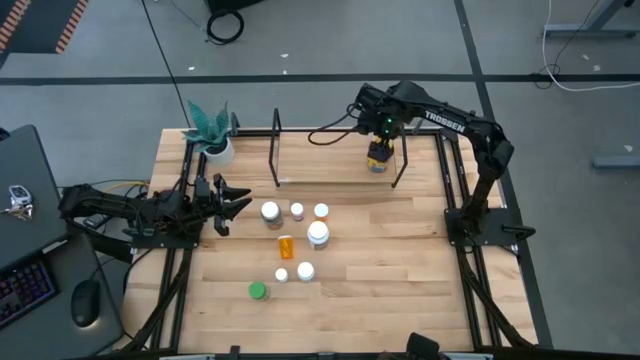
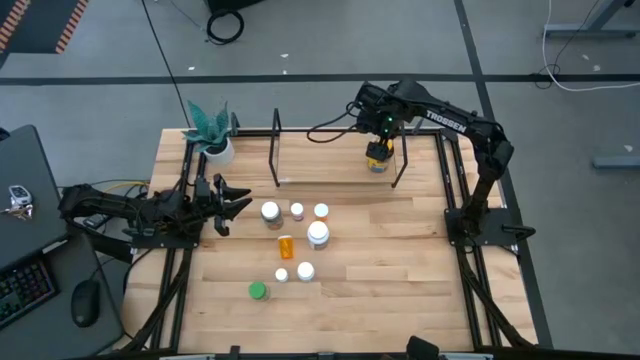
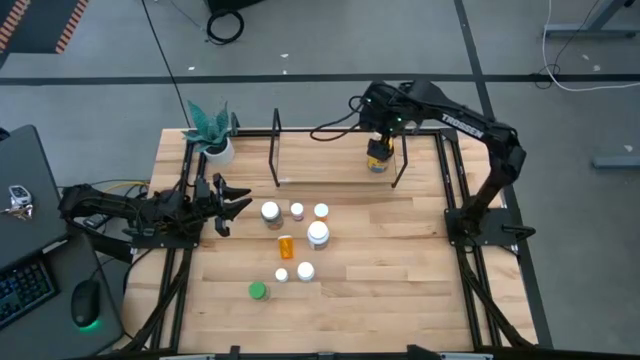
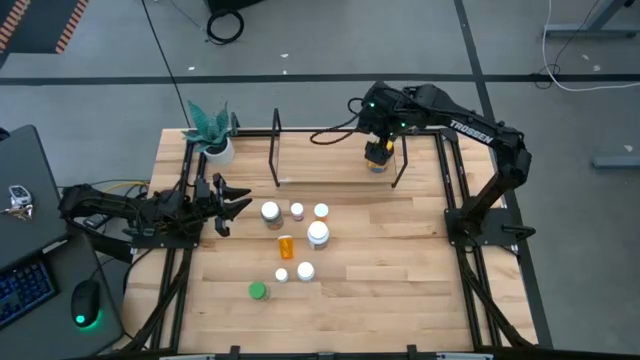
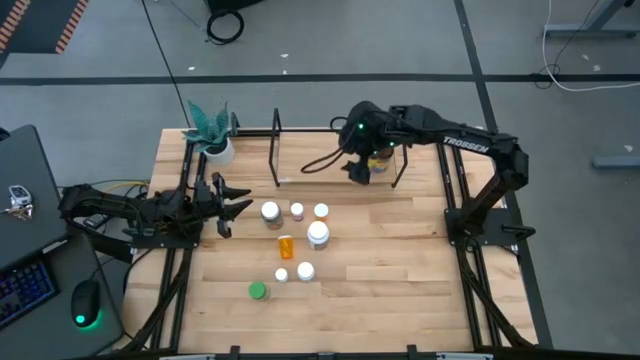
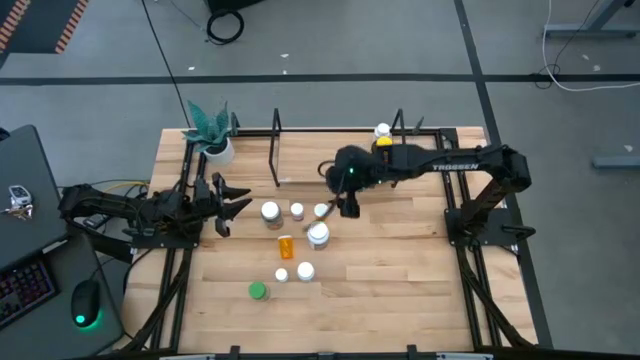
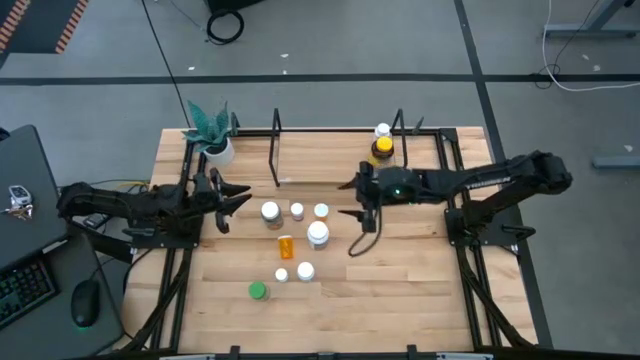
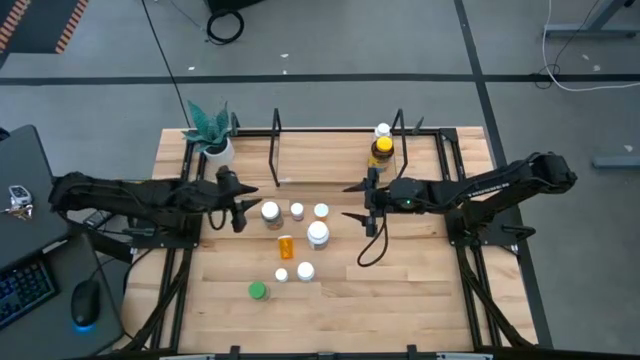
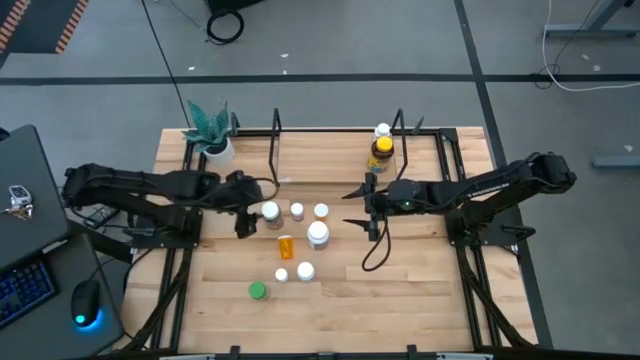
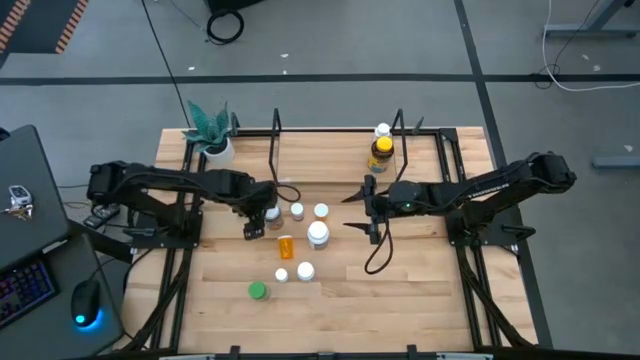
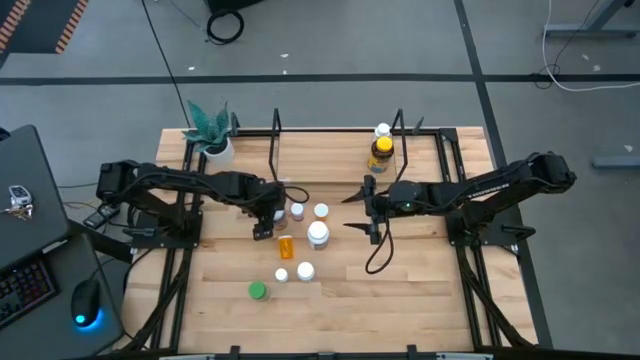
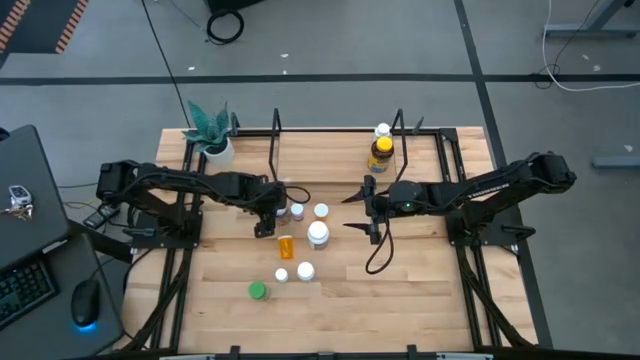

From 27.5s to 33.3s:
Task: Pick and place medicine bottles onto shelf by color
Put the white-green pill bottle on the shelf

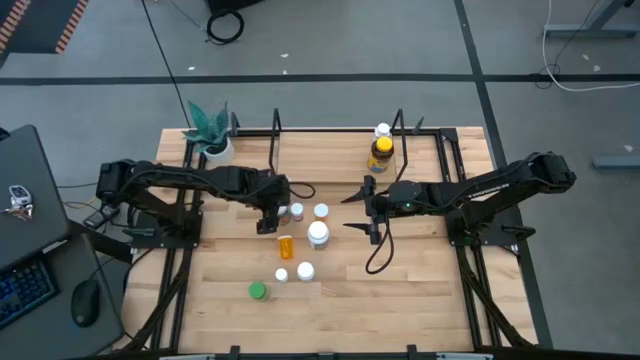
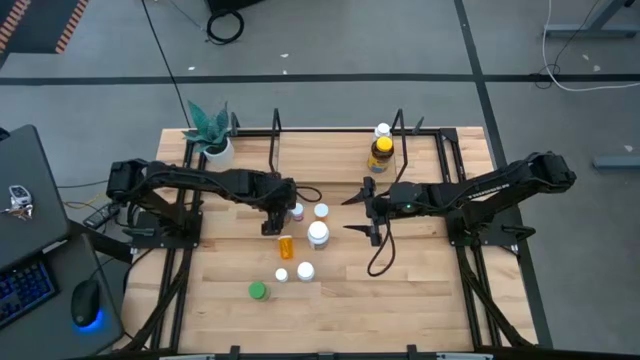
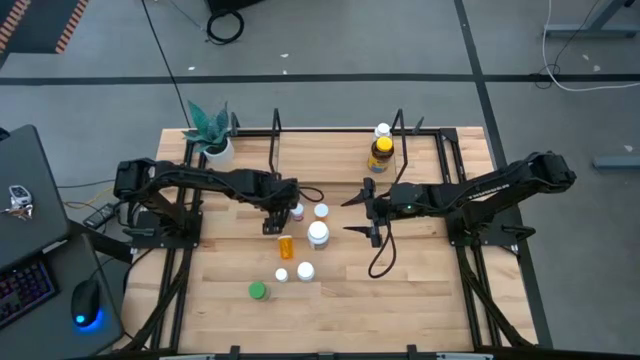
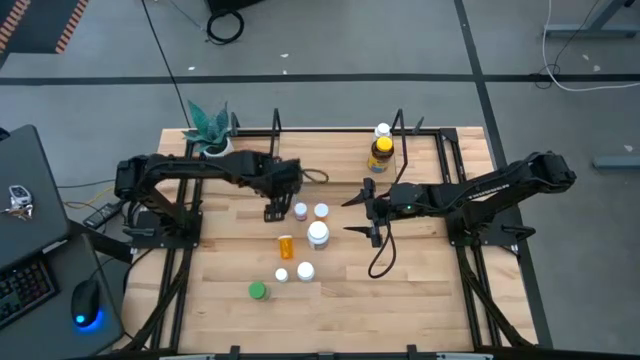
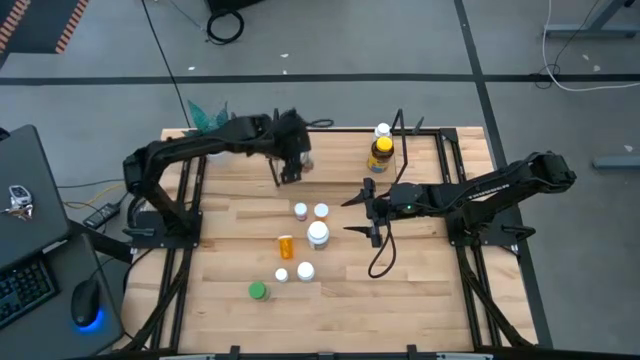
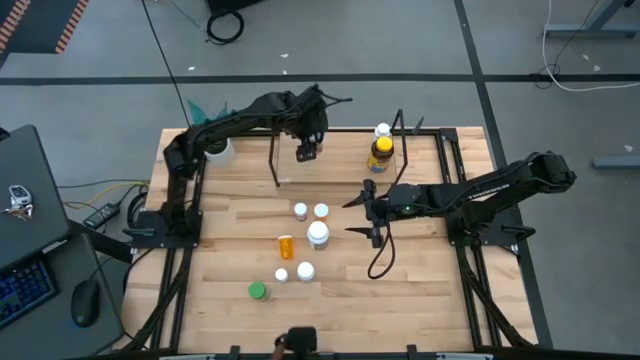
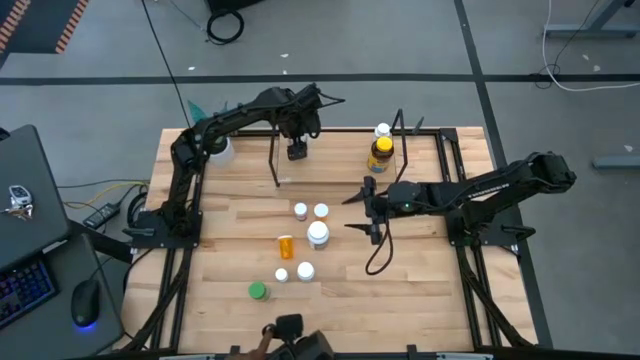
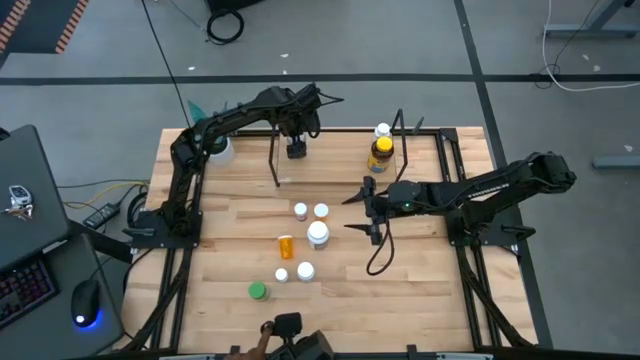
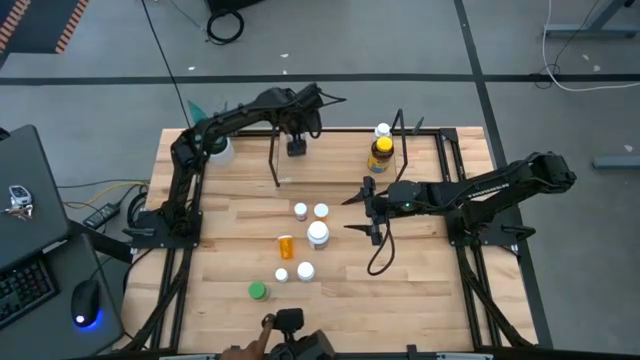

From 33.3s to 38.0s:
Put the white-green bottle on the shelf

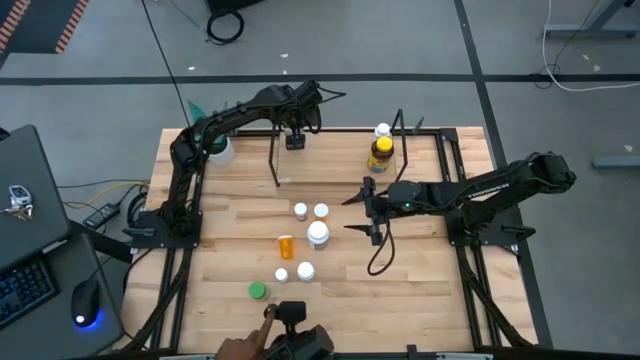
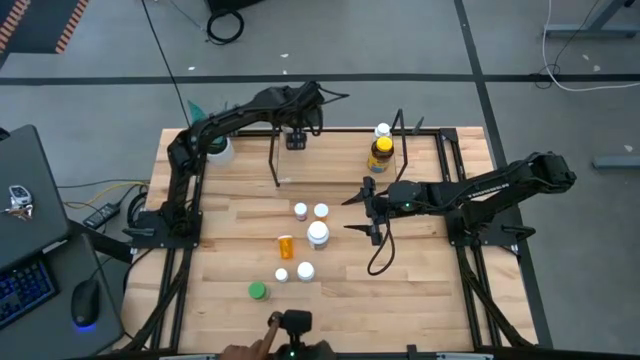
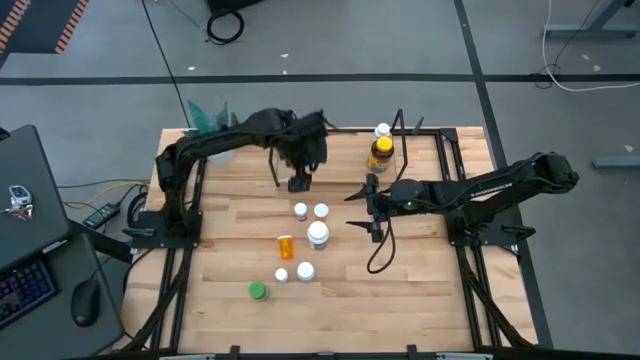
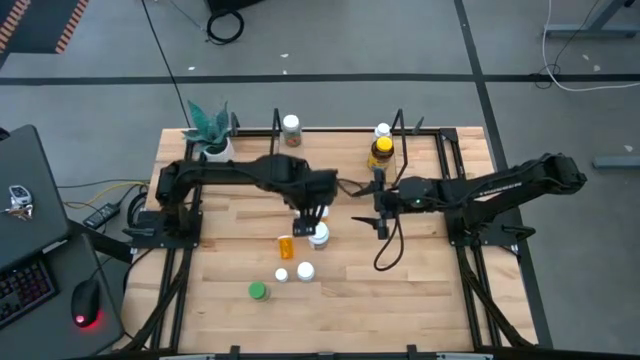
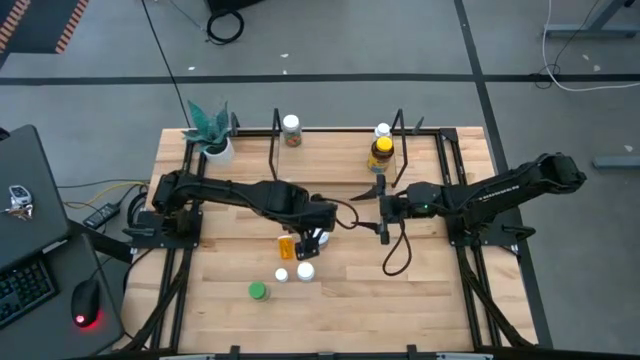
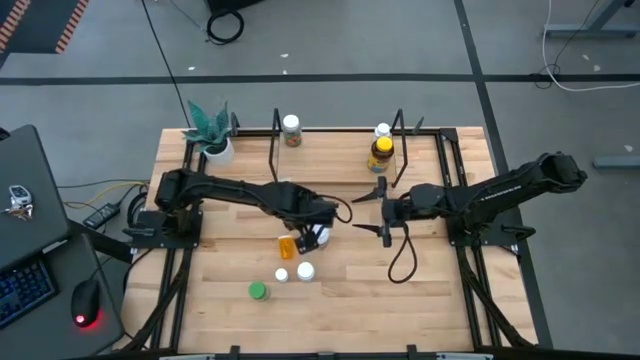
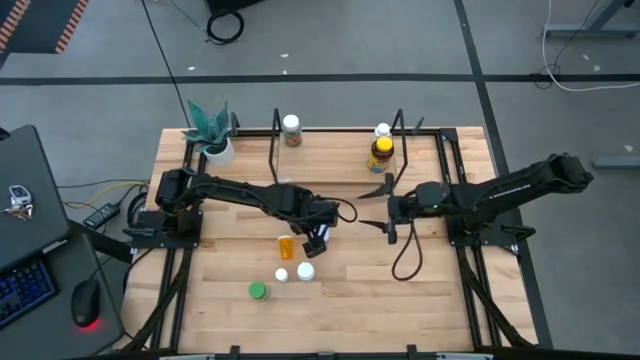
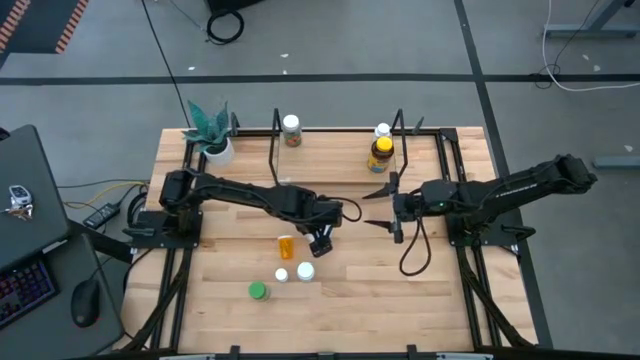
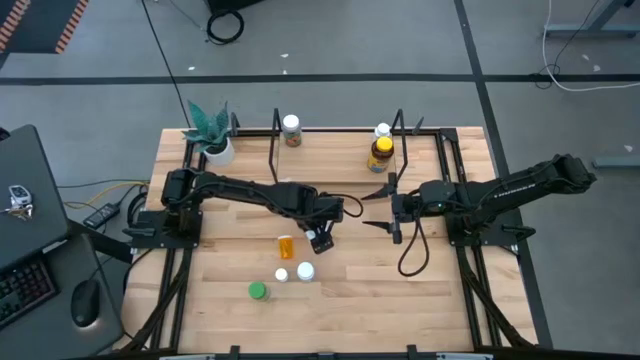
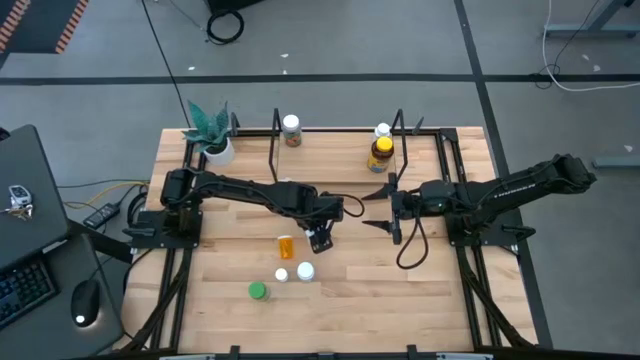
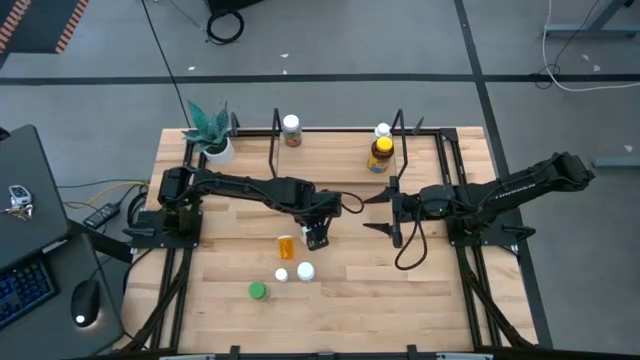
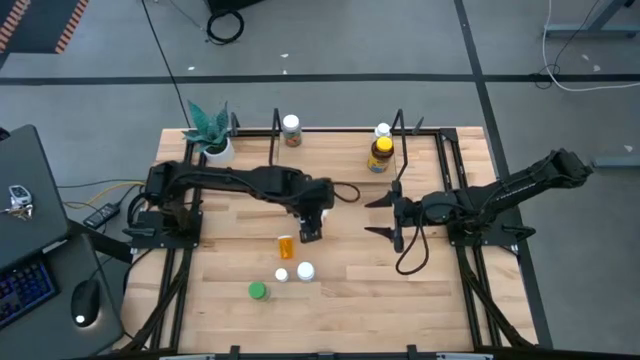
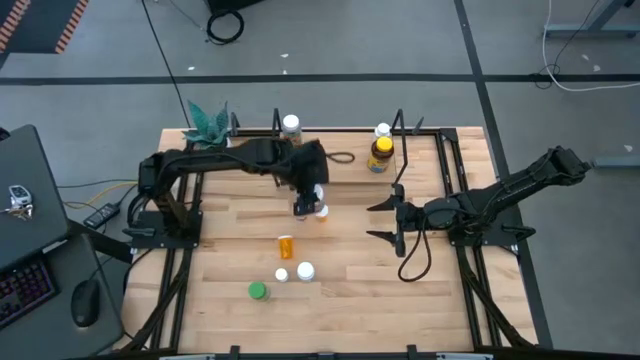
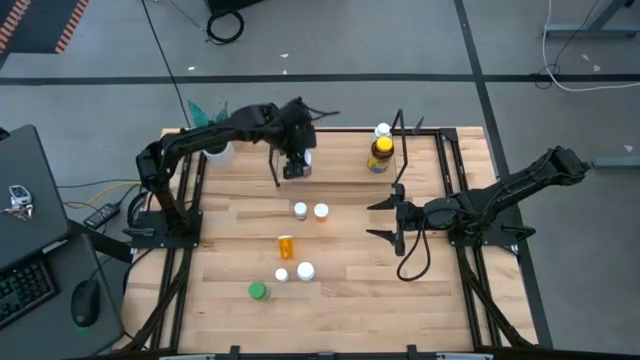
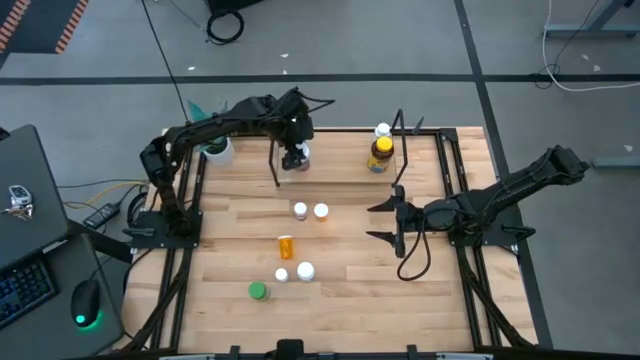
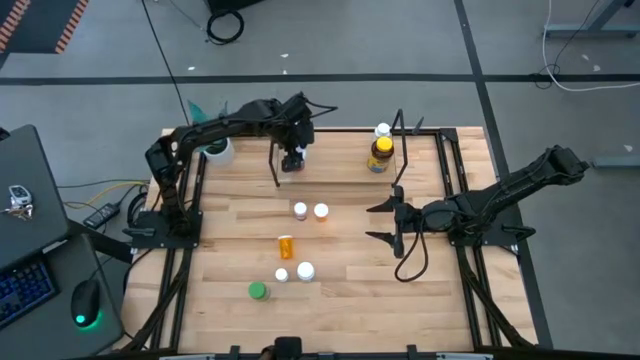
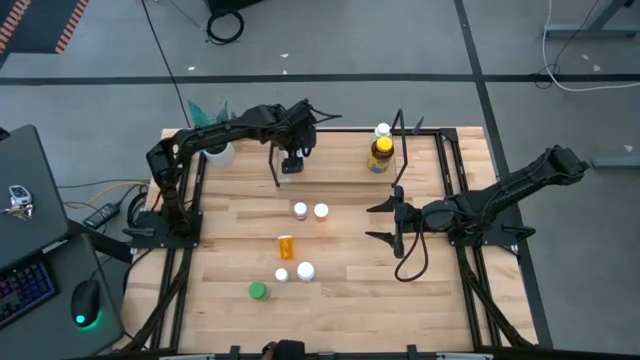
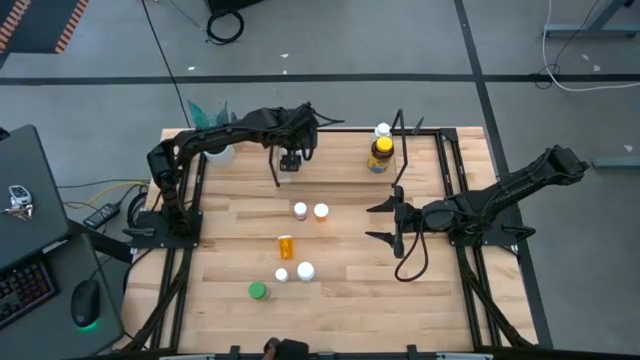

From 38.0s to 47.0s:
Put the white-purple pill bottle on the shelf

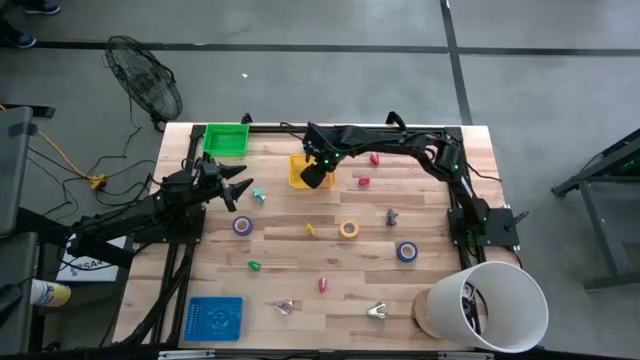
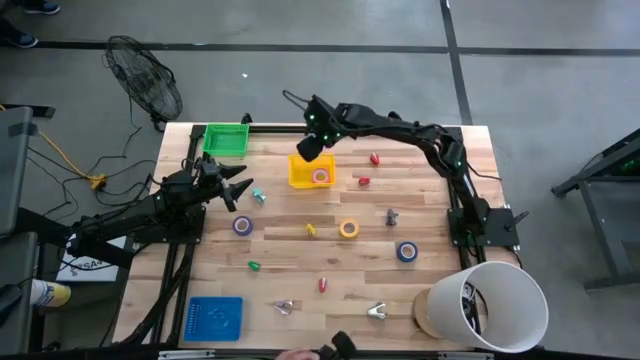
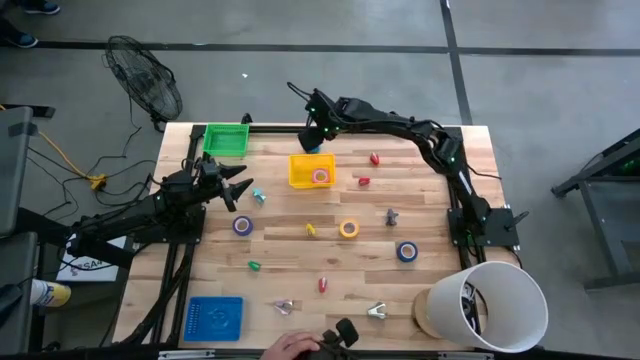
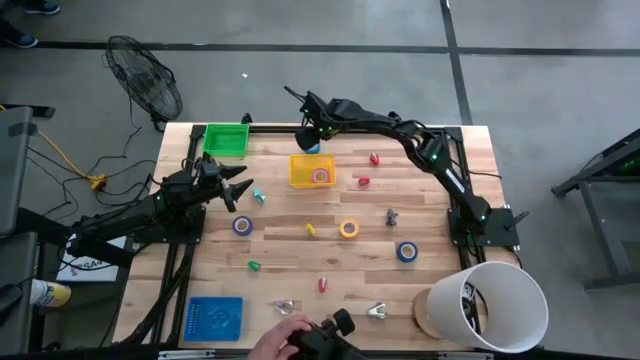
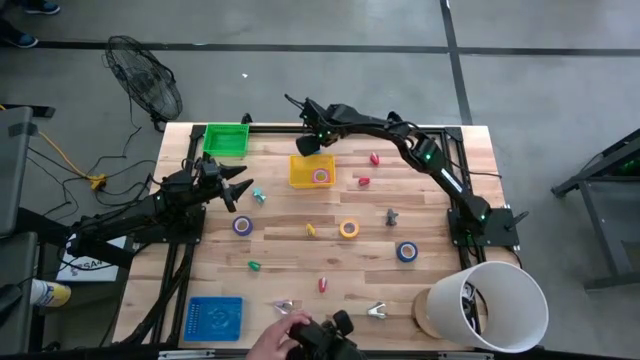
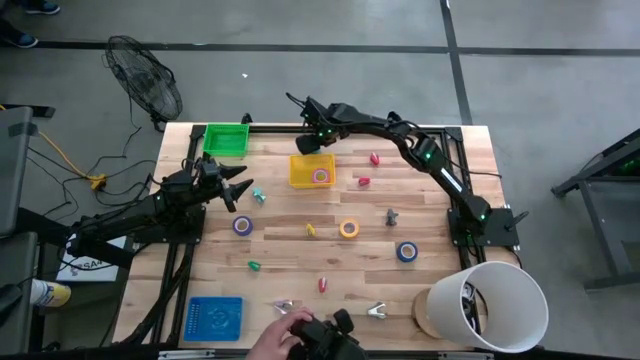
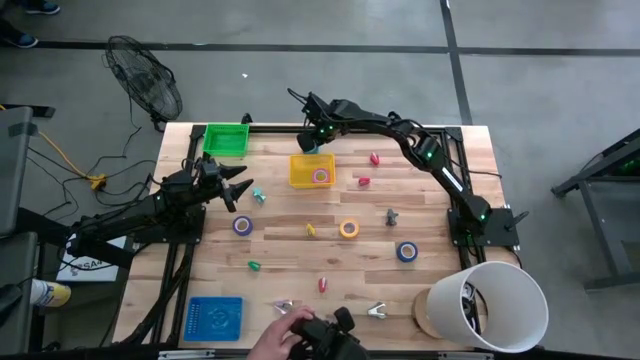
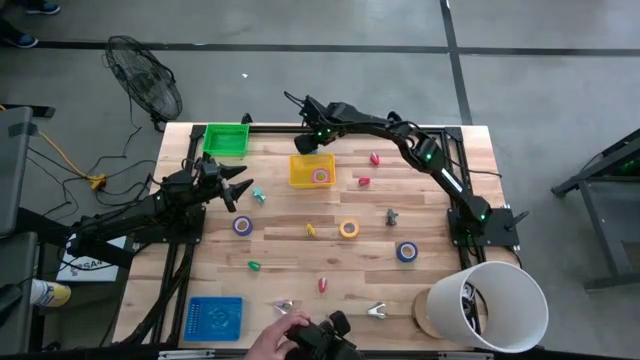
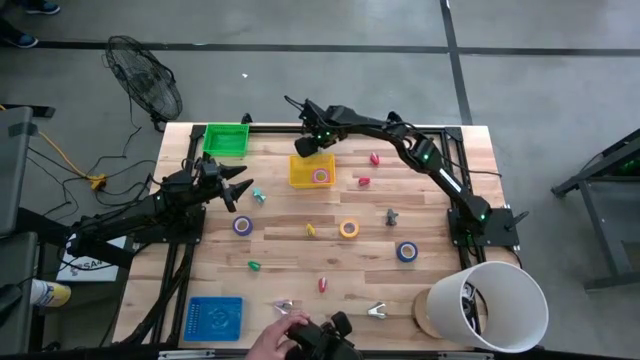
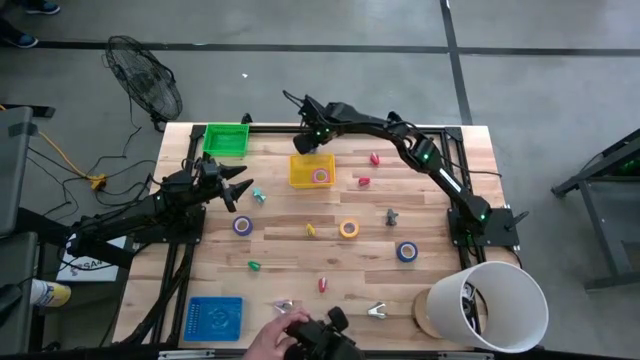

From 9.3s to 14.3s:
Task: Pick and place Stapler, Stapler remover, tape
Put the blue tape into the yellow bin
